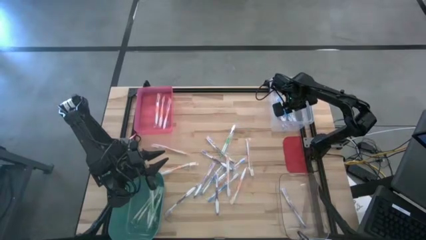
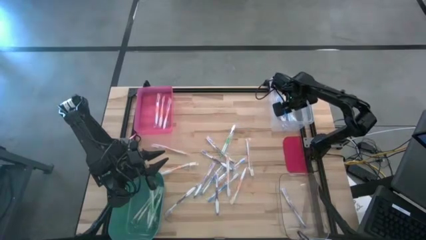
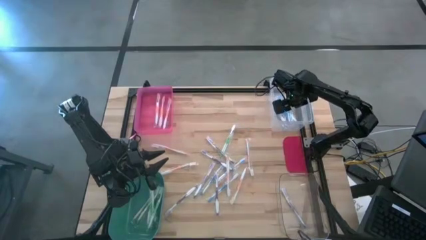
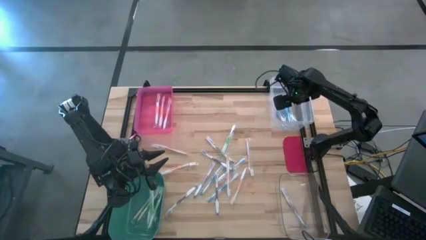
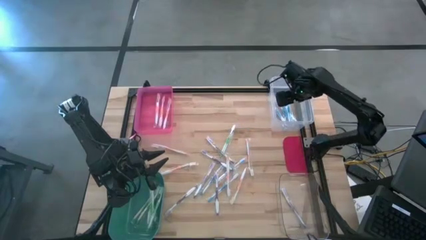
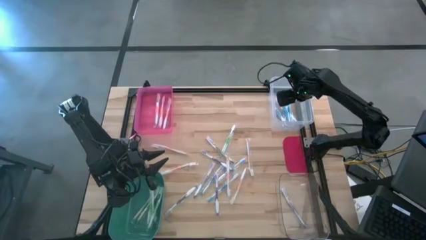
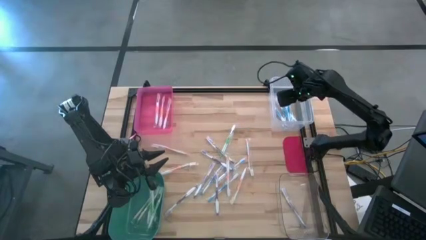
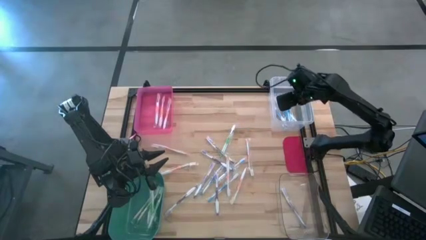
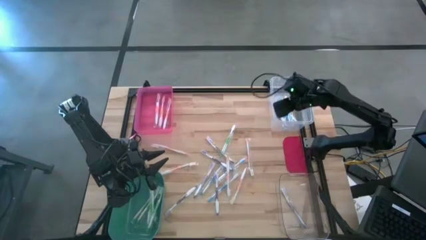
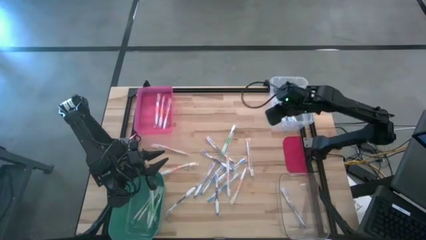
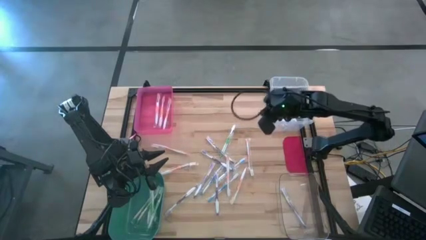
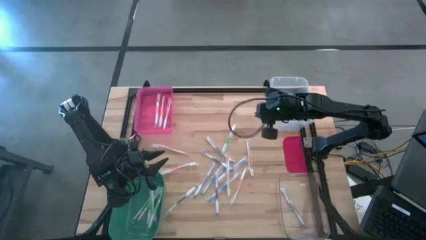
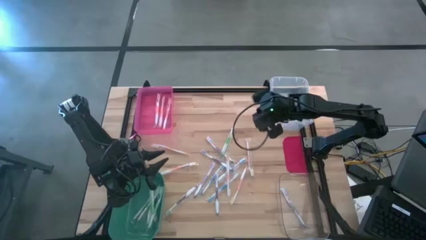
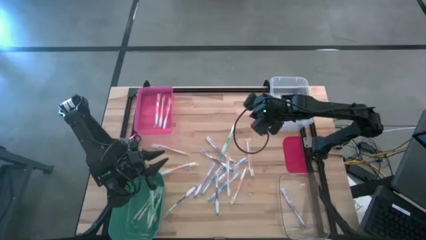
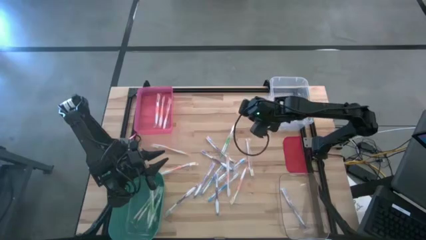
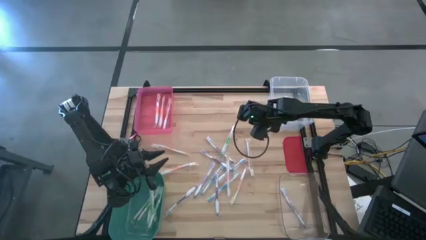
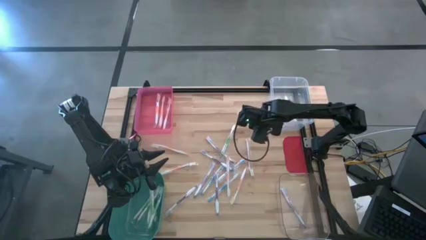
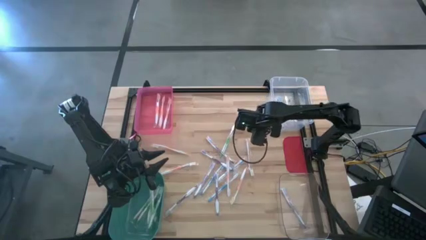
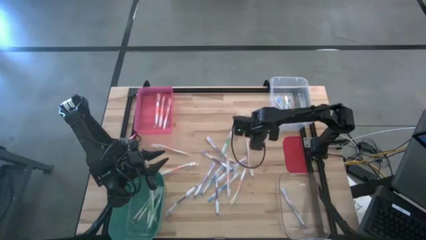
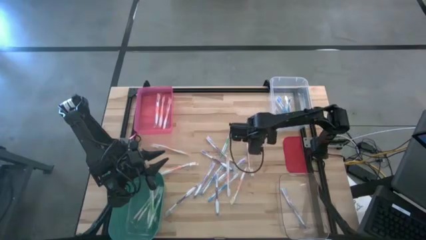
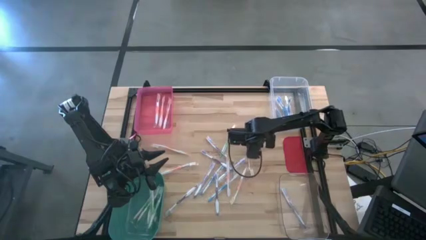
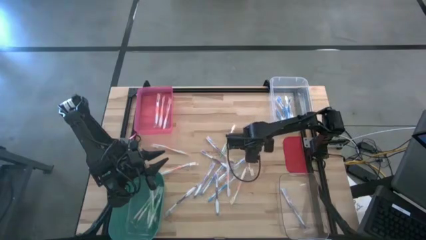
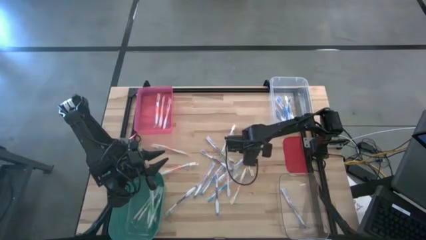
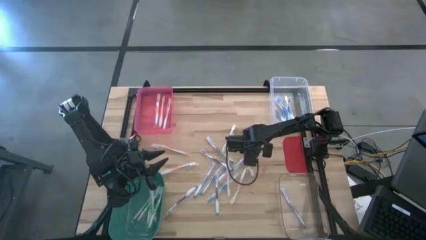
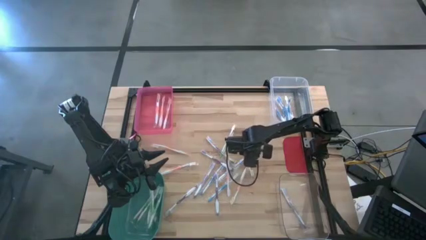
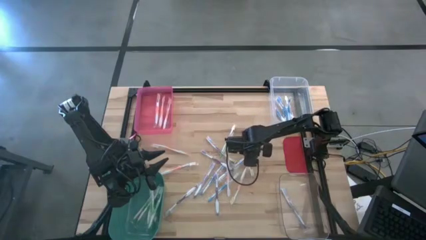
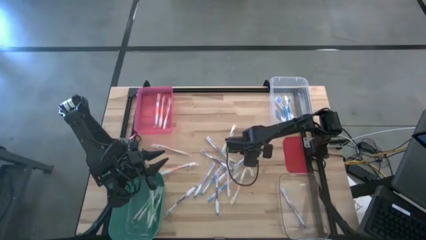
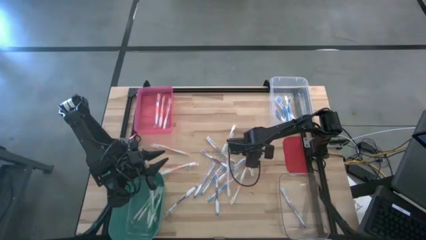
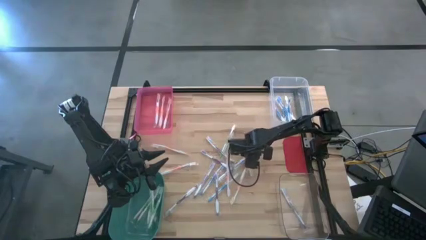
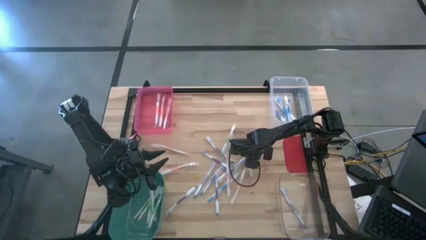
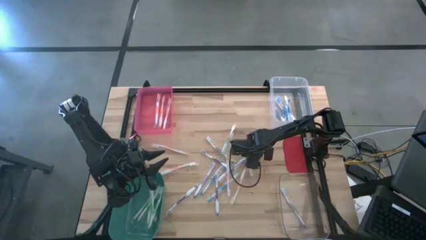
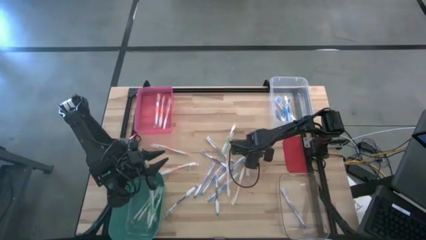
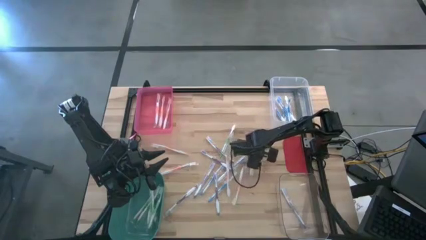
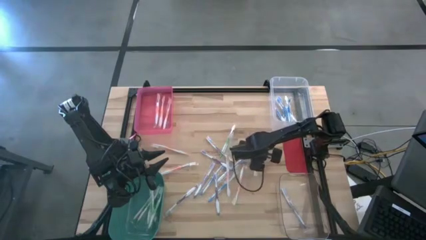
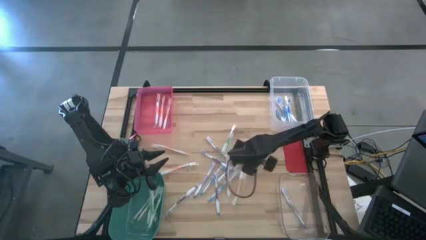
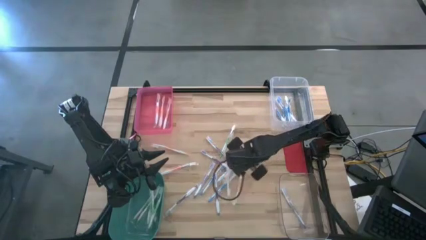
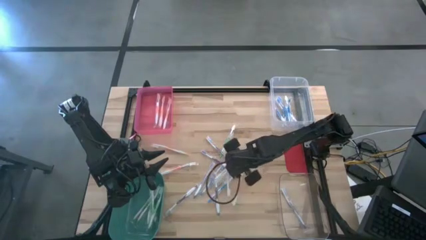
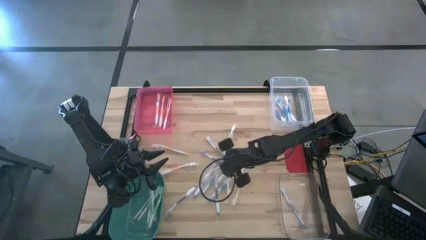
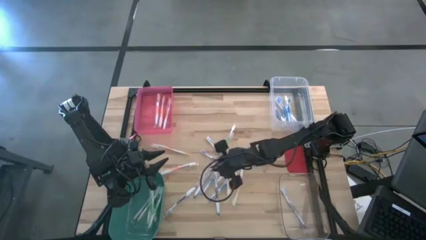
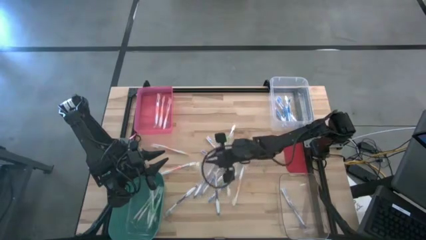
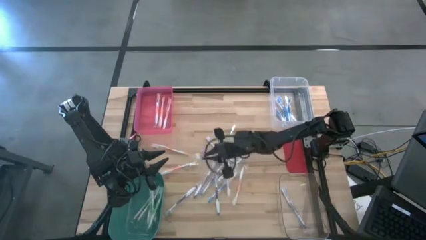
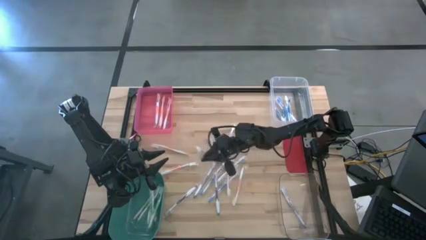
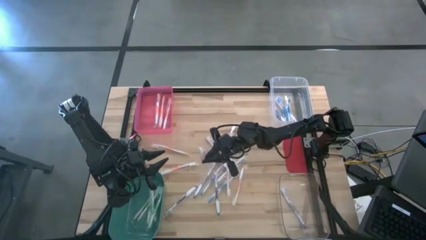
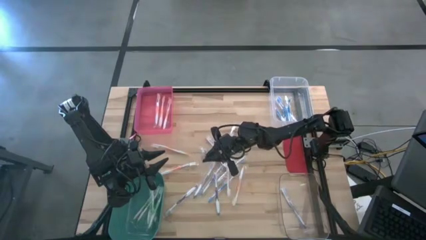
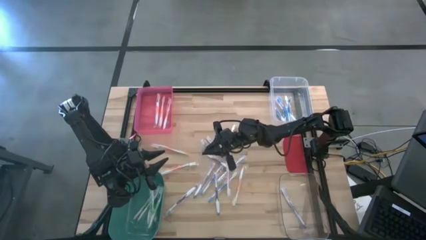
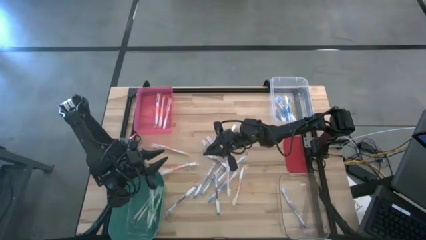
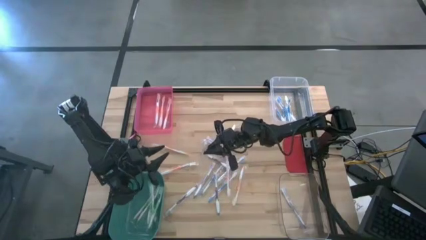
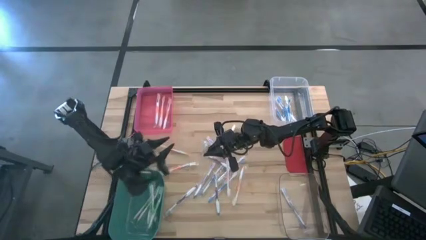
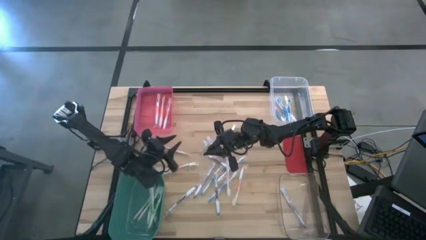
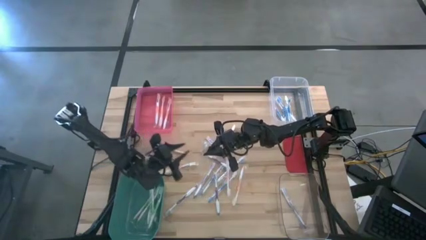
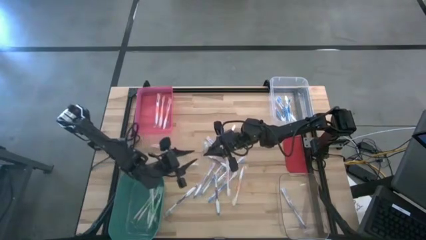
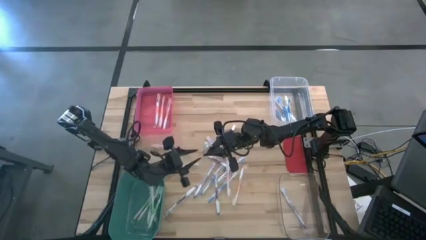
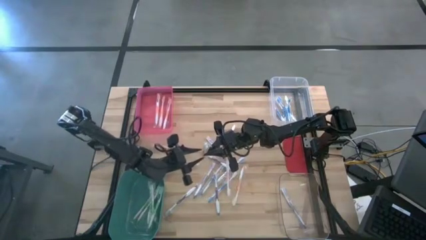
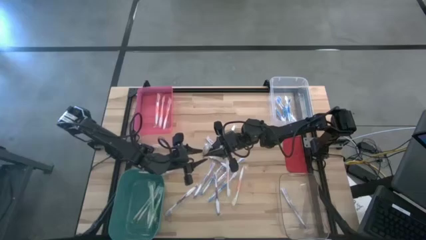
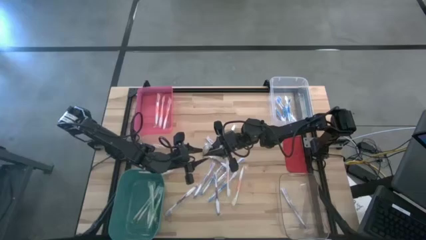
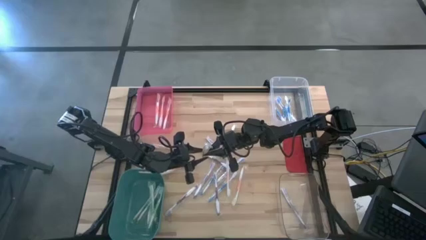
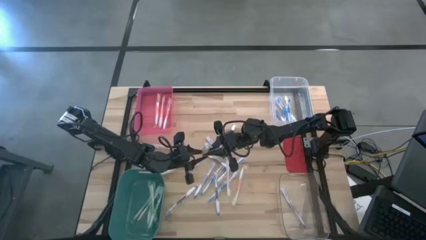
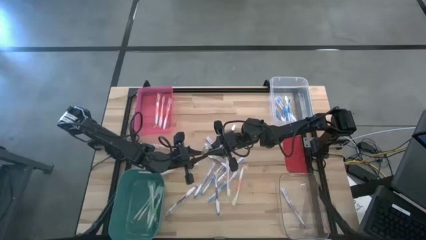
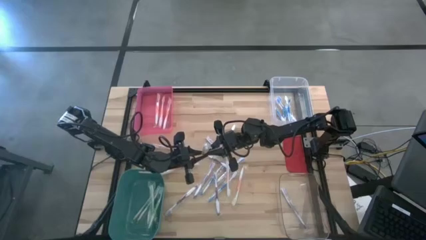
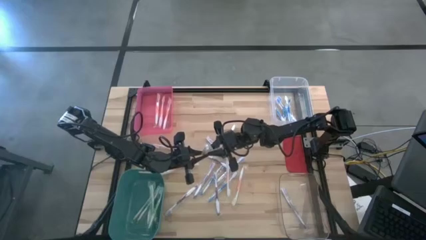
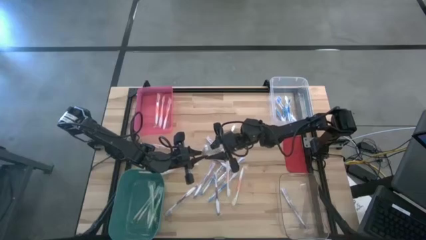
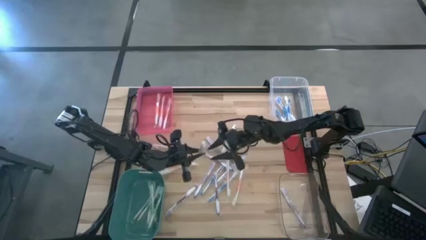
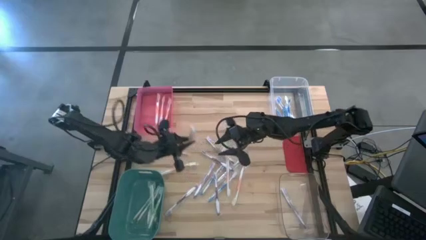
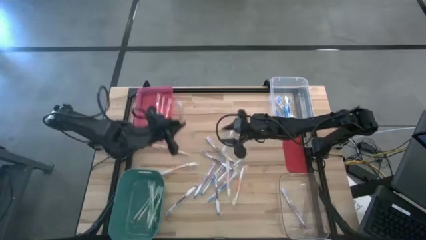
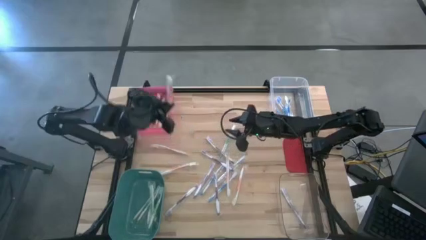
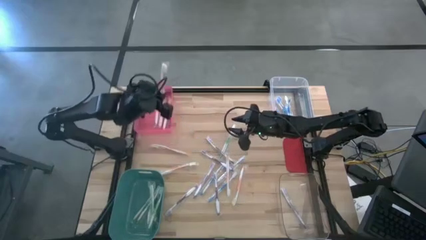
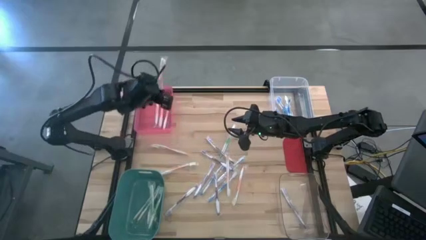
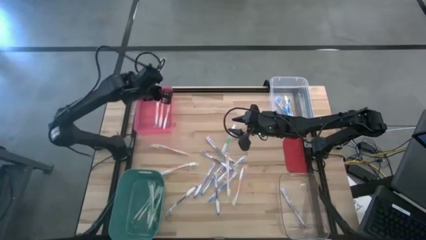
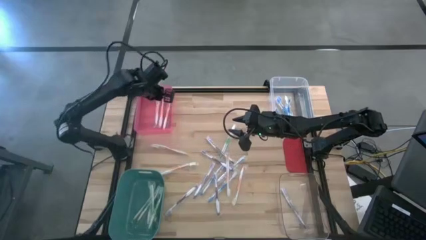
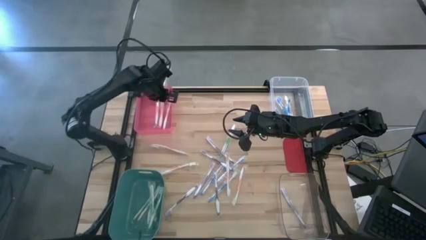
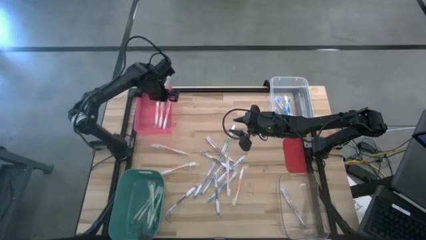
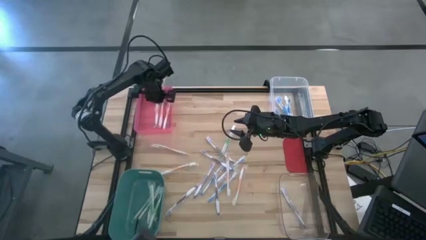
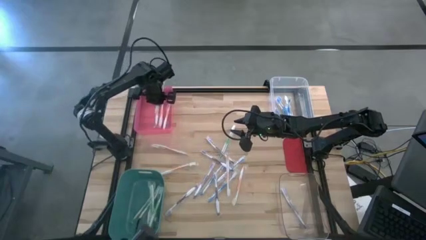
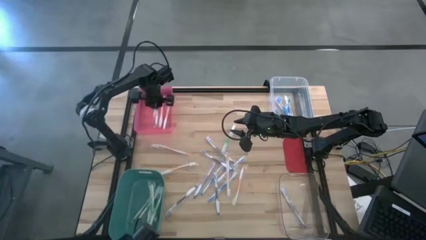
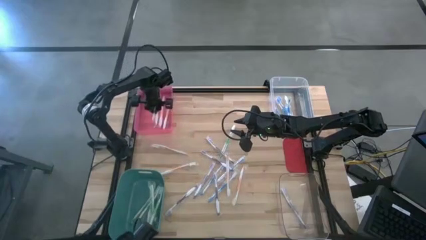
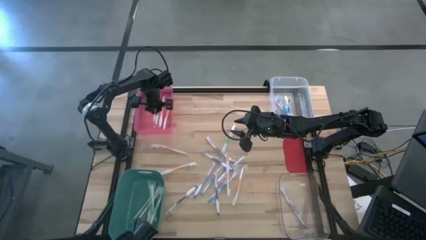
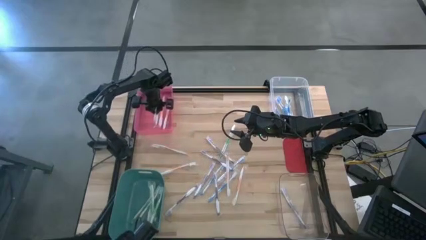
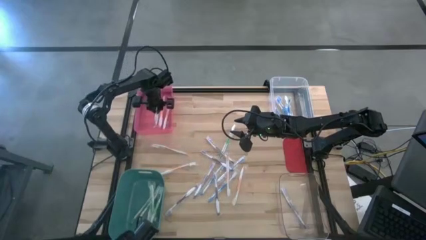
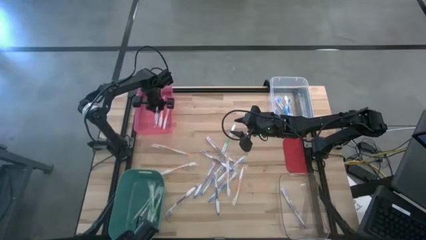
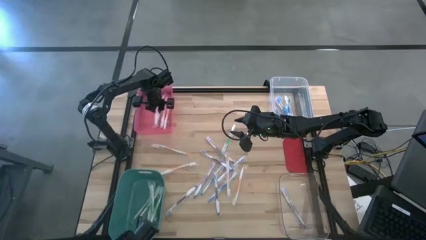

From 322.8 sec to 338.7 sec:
Task: Pick & Place Toothbrushes
Put the orange toothbrush into the pink bin
